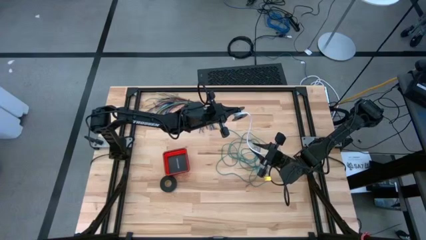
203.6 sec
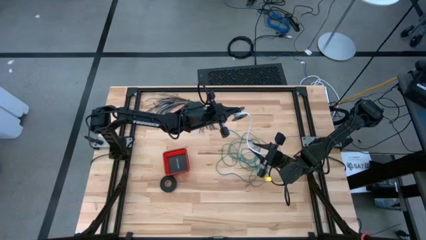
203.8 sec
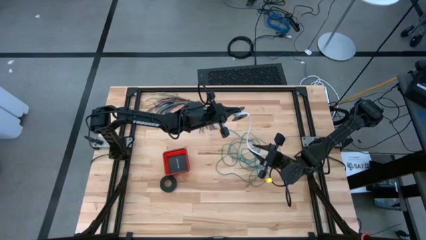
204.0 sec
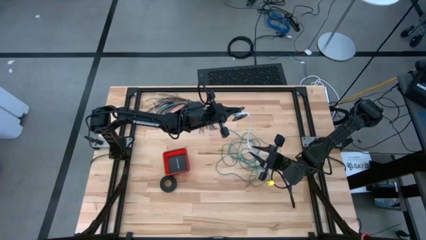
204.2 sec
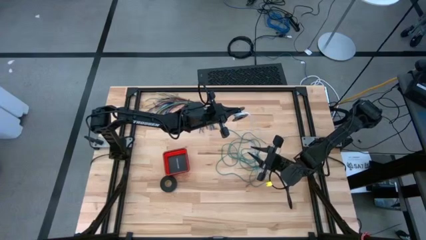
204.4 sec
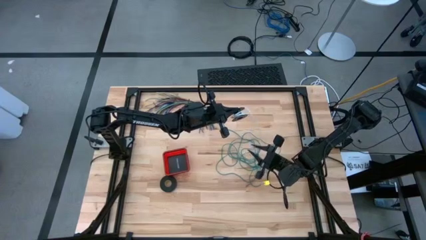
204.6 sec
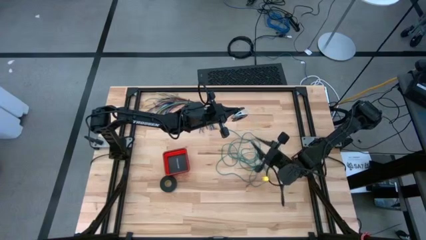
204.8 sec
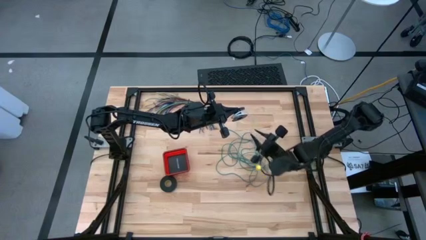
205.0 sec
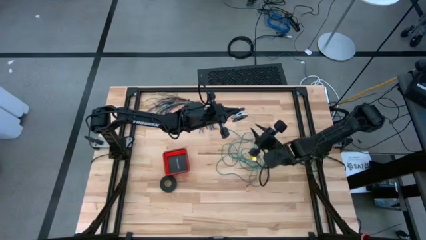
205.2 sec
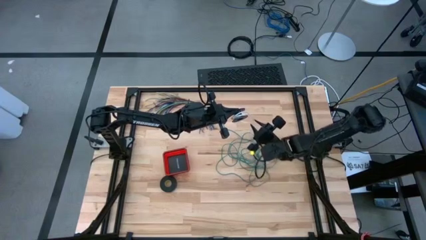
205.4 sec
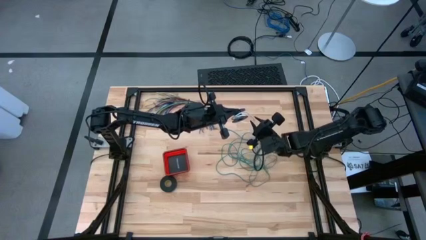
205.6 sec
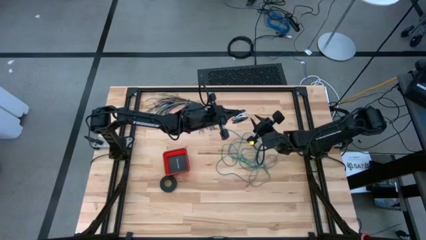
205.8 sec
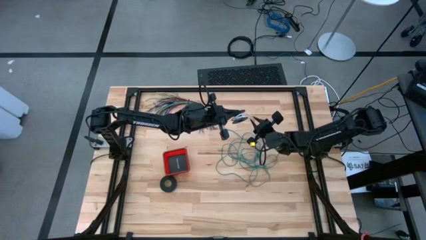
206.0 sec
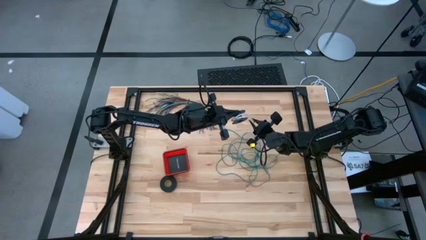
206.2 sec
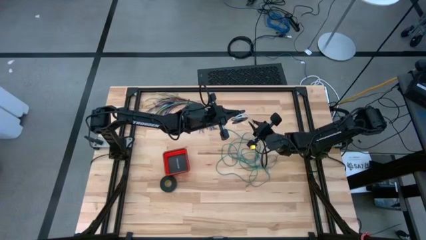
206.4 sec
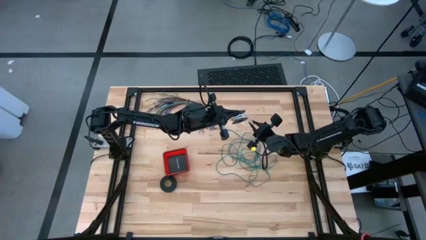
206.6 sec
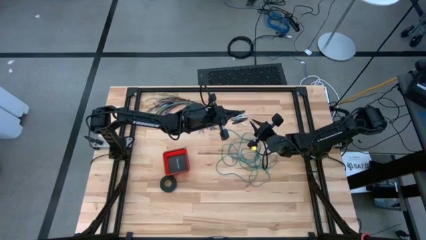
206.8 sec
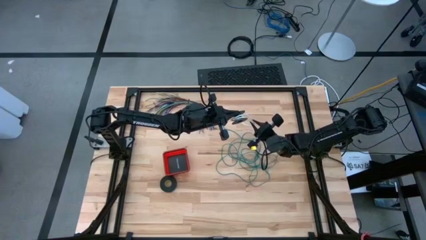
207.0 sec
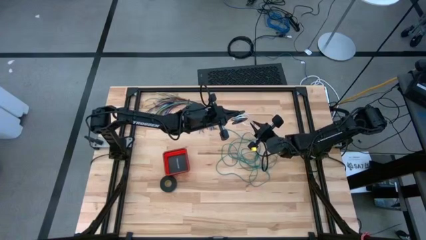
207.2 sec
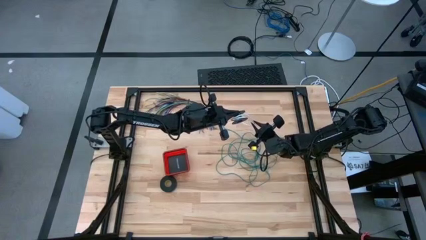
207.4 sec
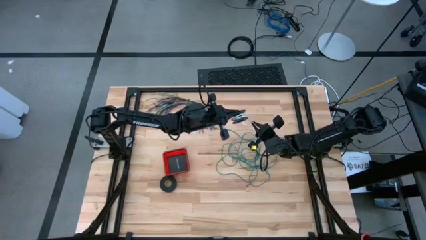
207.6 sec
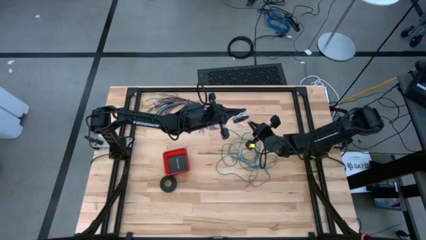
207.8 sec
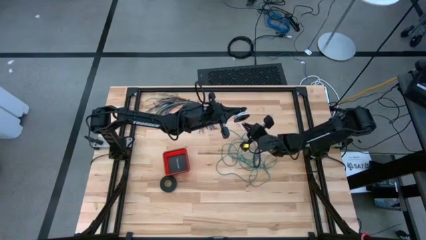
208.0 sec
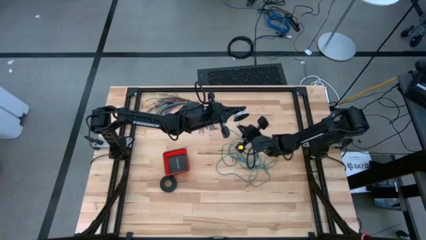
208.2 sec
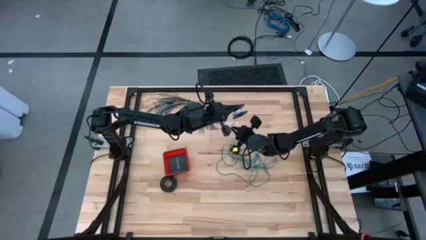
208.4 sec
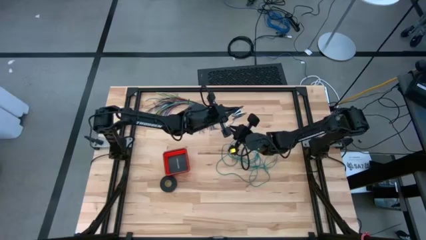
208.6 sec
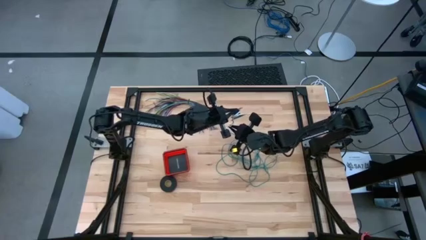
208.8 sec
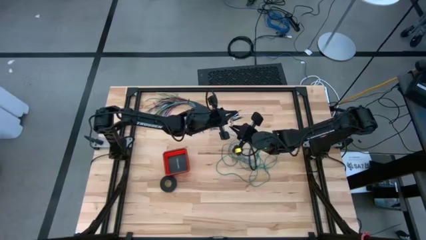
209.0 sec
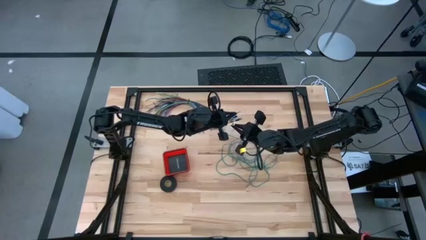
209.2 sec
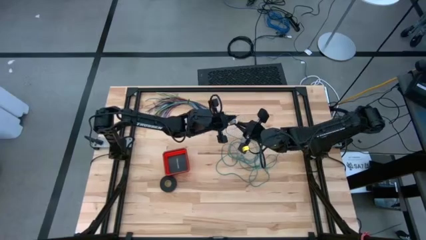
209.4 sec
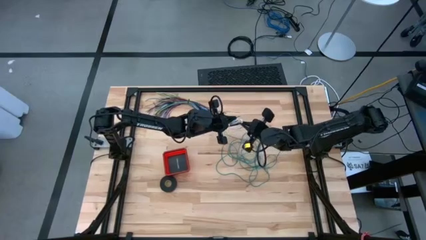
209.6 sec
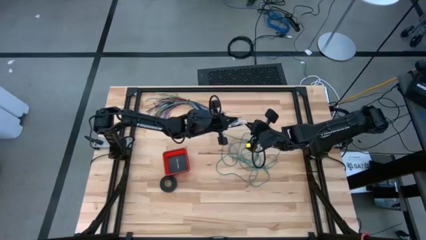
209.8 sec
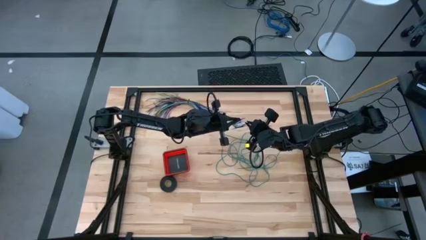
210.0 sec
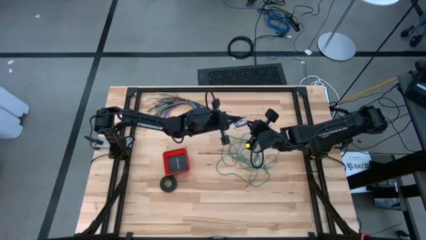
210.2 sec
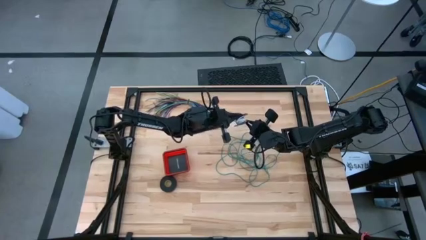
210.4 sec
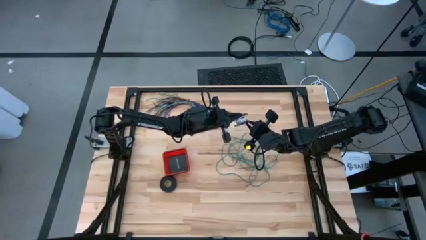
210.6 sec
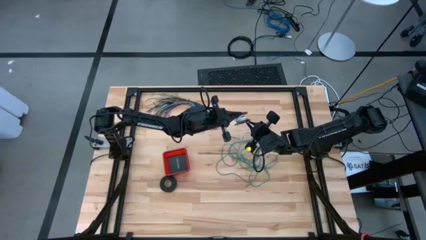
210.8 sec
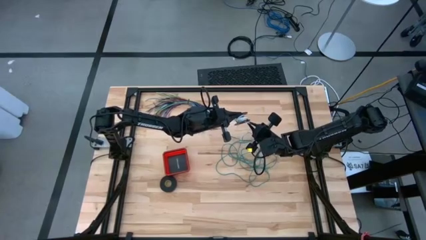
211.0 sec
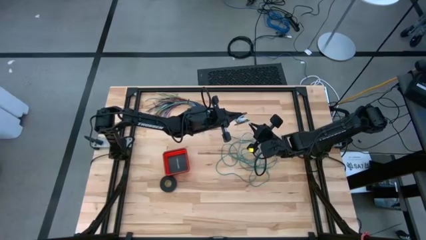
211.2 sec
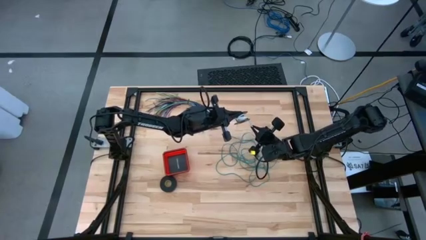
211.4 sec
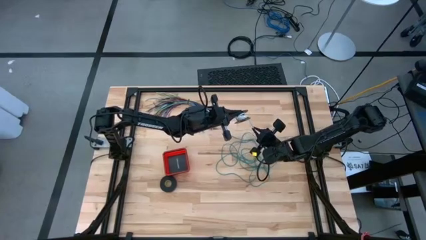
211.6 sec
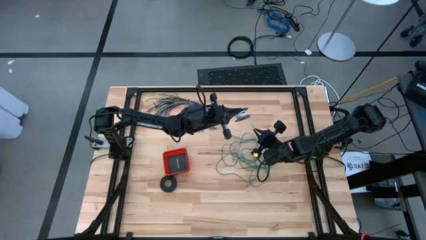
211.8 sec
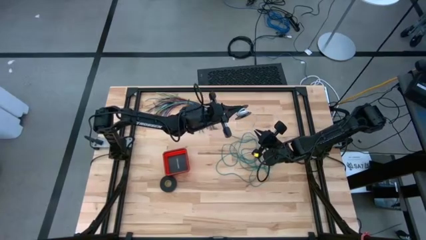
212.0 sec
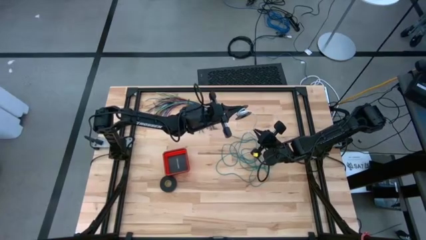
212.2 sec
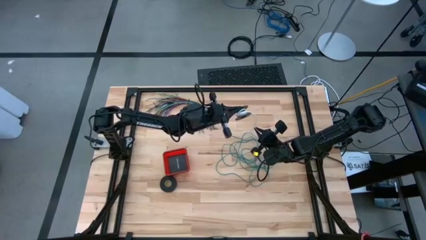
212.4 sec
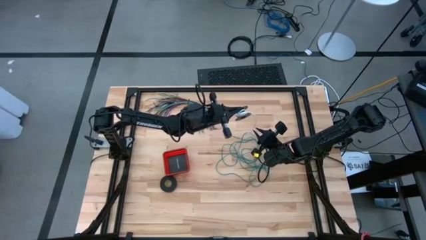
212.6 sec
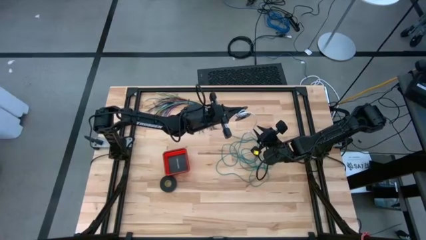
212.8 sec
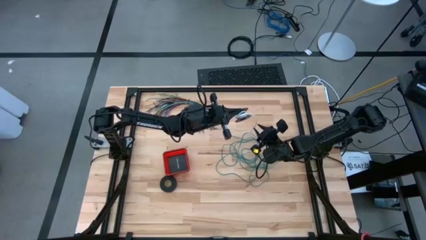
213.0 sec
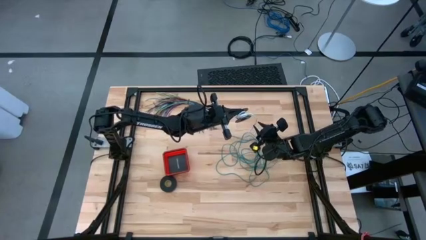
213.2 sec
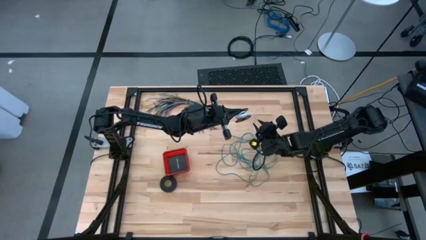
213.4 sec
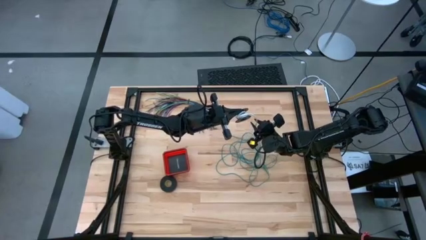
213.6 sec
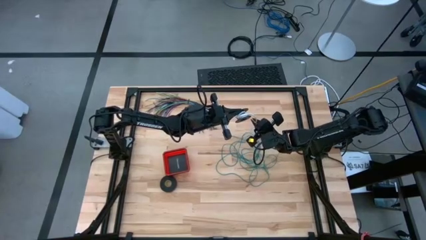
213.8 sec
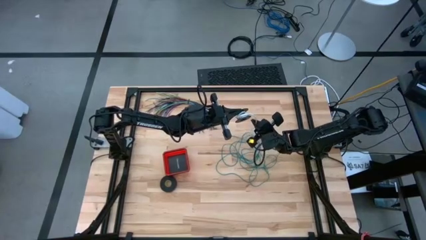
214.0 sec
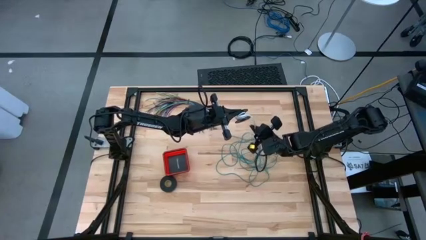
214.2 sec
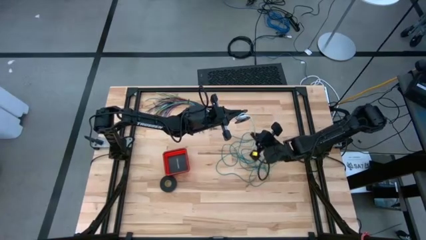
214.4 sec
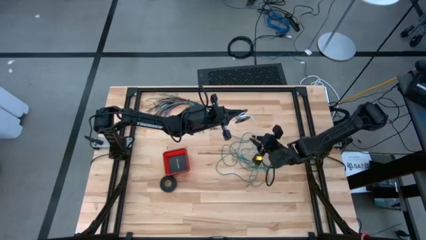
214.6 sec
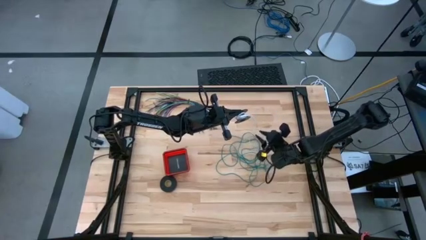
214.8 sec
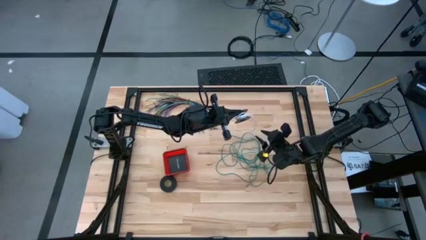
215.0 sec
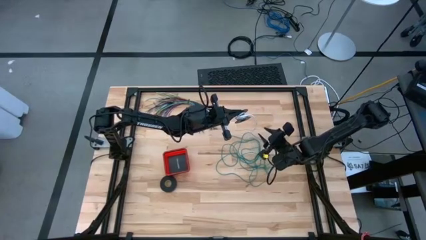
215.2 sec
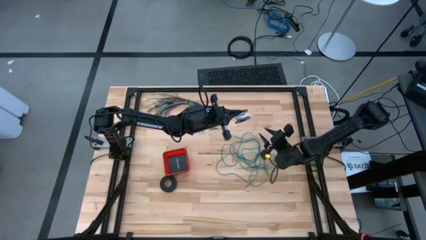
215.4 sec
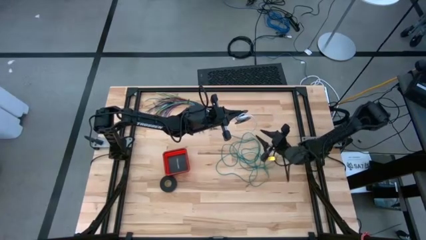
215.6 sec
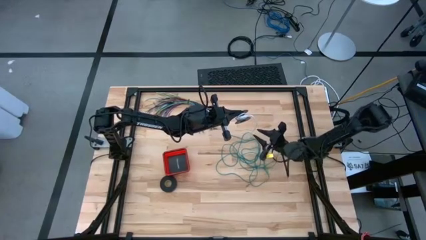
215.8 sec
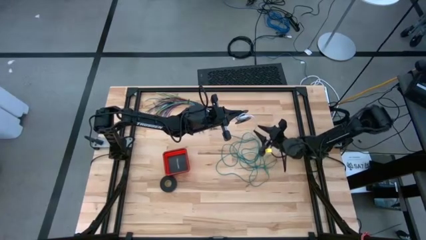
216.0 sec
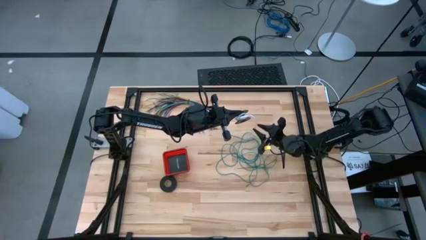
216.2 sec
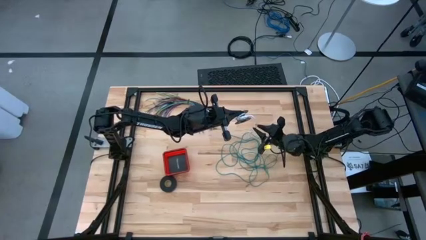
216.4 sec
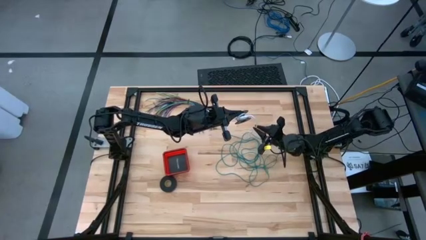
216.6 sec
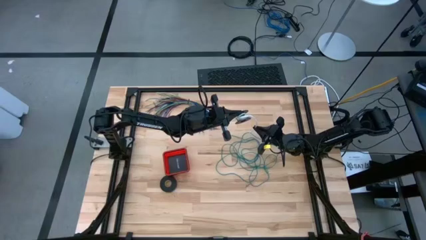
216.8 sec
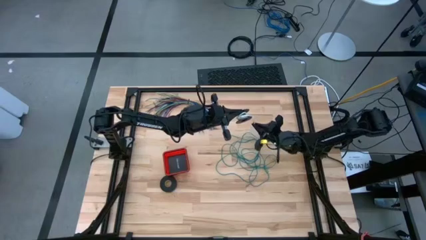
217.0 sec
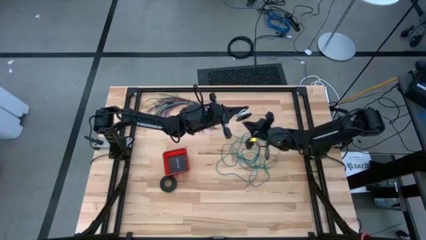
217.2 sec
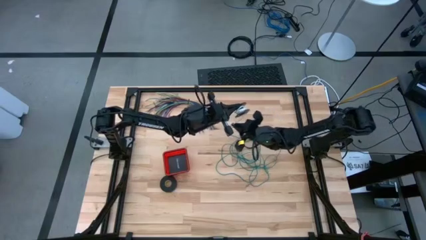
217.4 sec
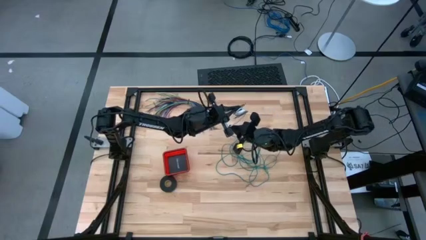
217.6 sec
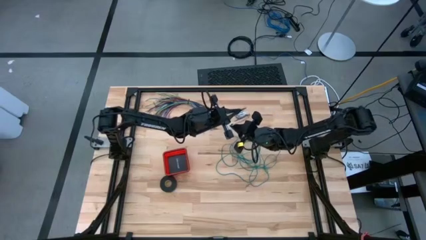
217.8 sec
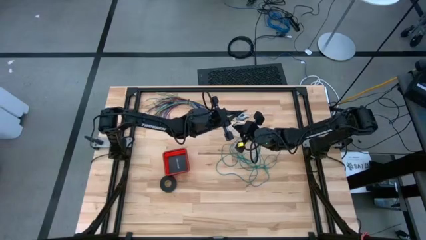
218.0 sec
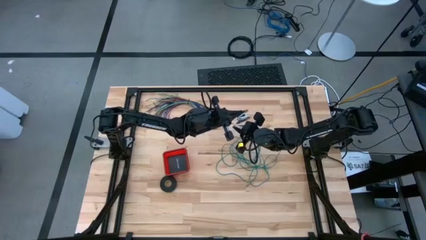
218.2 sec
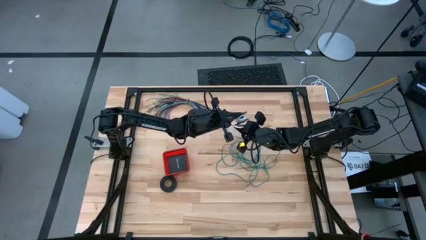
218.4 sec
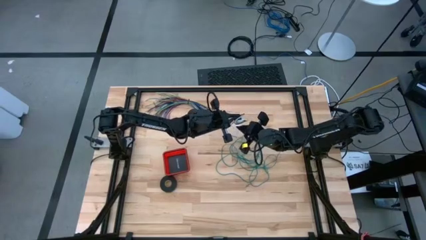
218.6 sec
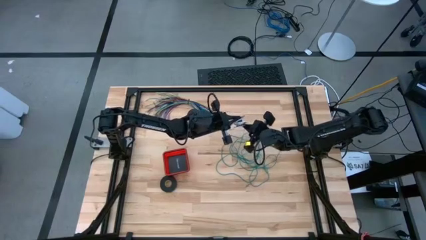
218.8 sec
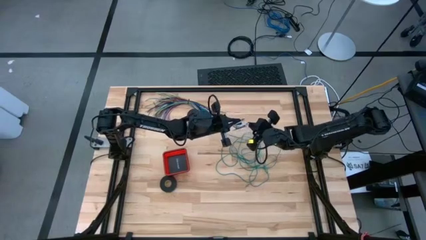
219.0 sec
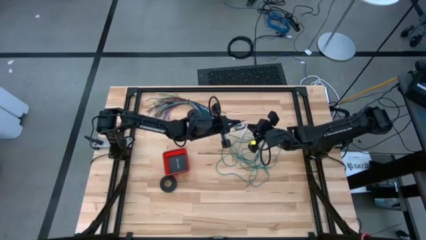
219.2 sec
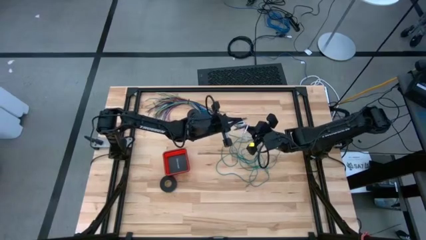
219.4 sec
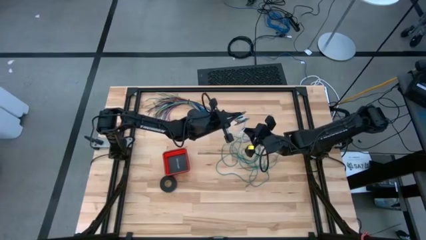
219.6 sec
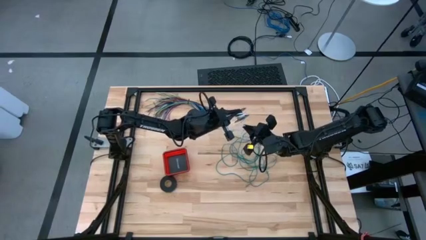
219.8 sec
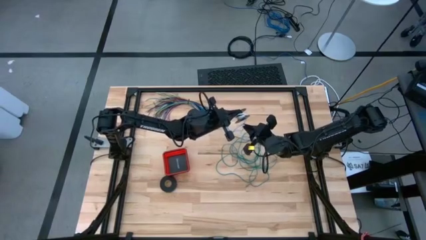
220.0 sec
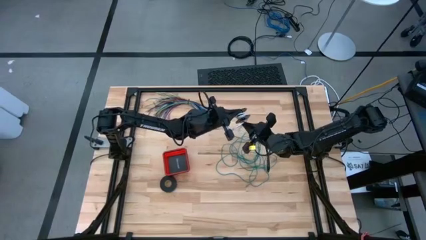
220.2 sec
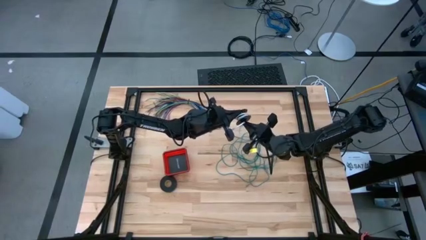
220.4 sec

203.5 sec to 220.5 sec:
Task: Coil cords
Coil the white wire onto the spool
